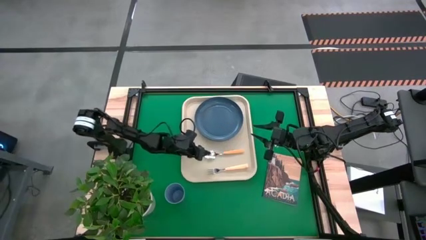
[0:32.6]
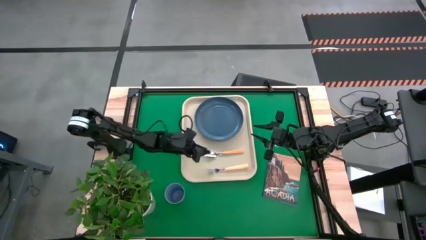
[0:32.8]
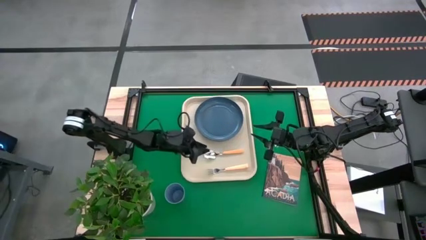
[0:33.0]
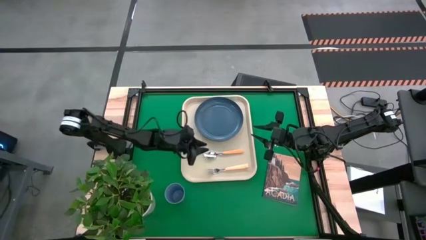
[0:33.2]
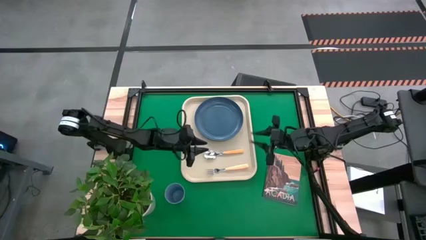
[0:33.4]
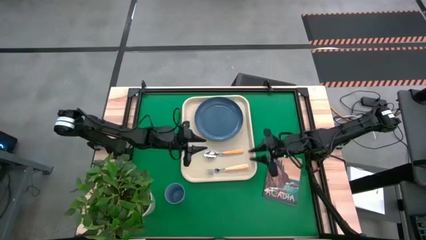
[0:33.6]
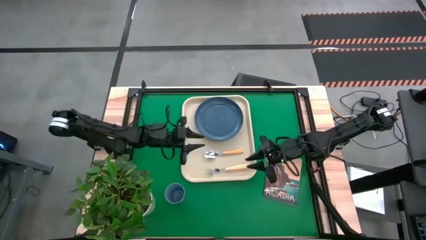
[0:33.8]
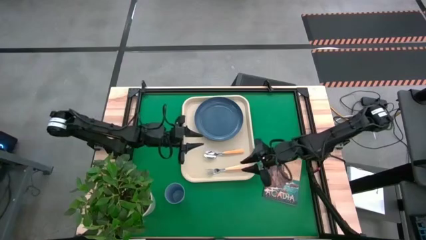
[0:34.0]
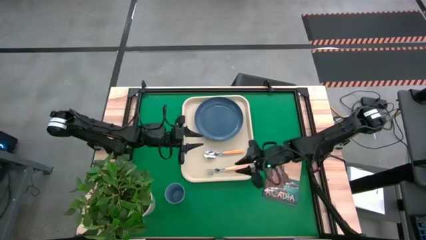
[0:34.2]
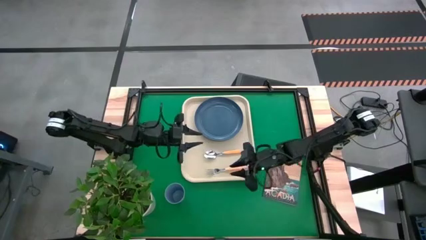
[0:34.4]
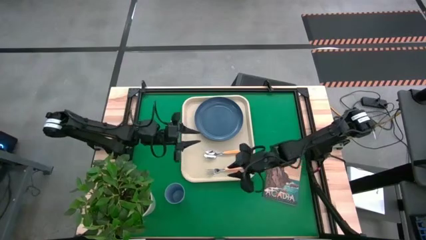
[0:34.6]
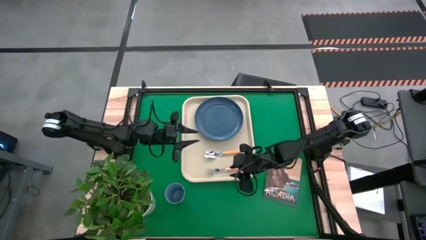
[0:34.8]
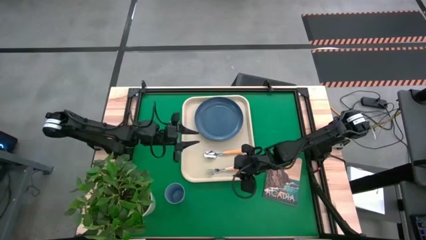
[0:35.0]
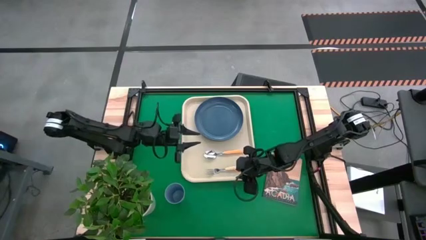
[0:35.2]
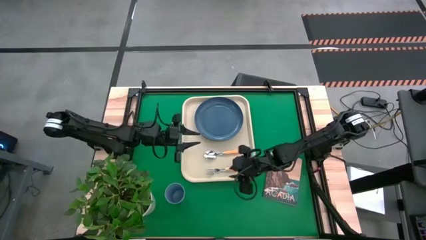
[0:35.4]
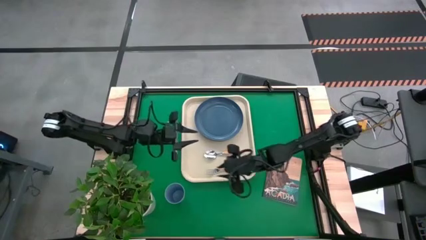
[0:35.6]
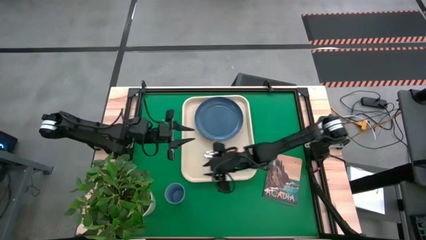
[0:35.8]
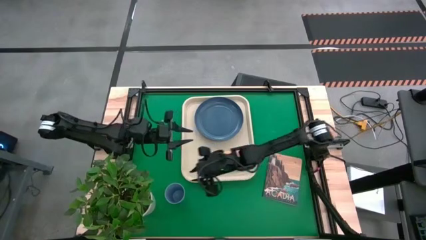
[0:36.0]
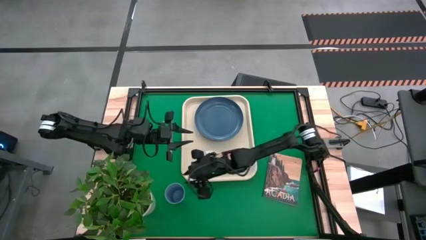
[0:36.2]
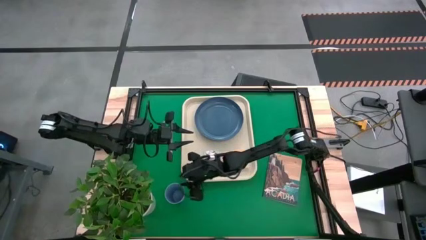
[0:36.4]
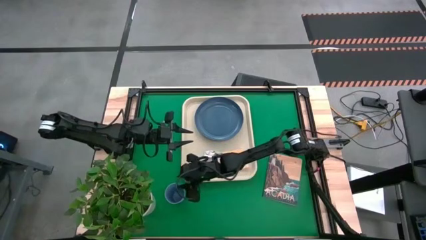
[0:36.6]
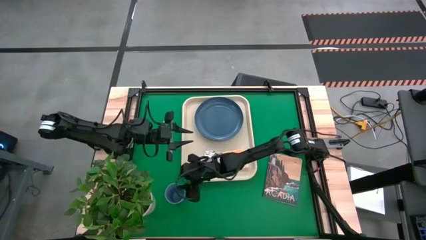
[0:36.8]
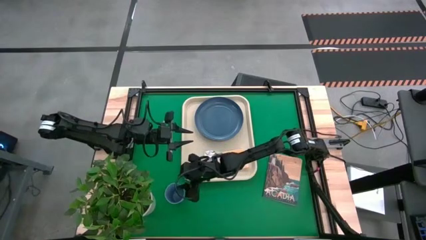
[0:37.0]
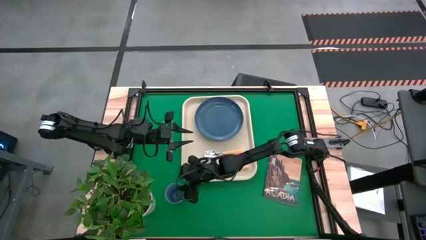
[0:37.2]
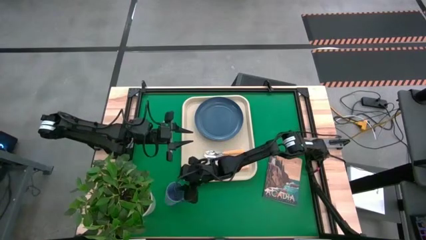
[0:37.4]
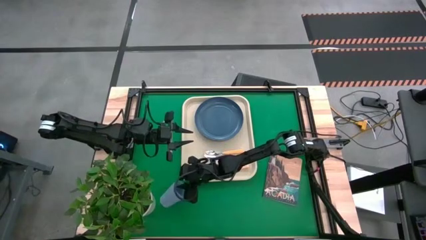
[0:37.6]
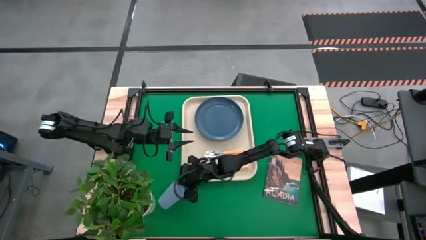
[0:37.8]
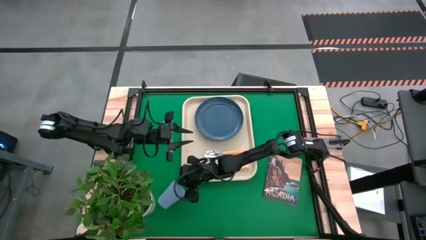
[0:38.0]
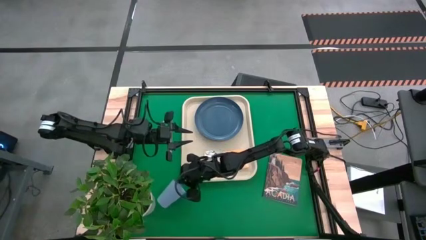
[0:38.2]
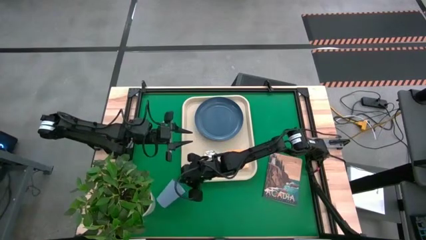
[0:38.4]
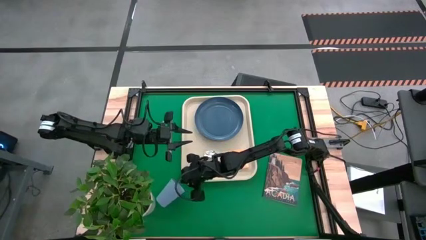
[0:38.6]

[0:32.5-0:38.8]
Task: Pick and place plate/cup/fork/spoon on tray
Put the blue cup on the white tray to the top left of the orange spoon

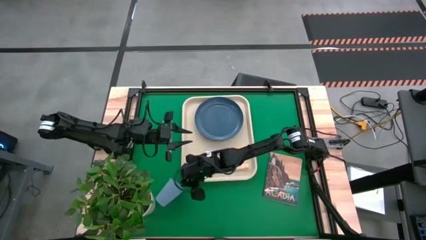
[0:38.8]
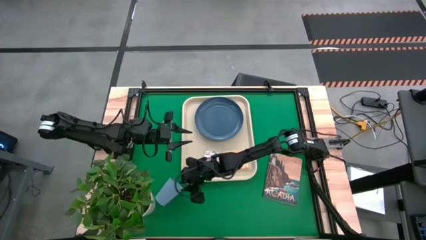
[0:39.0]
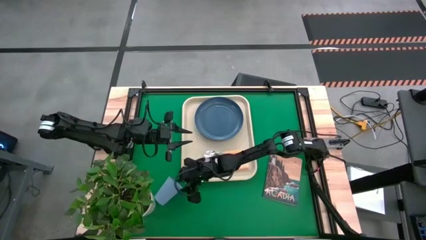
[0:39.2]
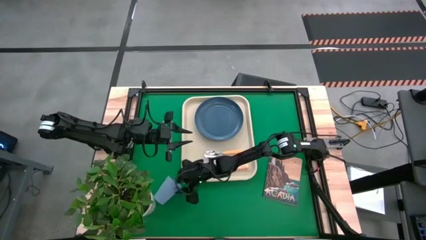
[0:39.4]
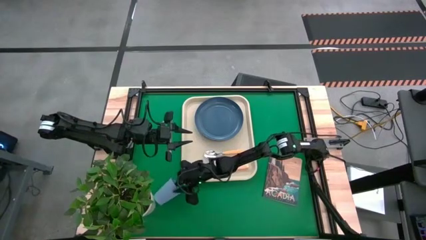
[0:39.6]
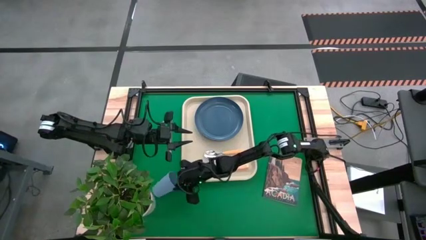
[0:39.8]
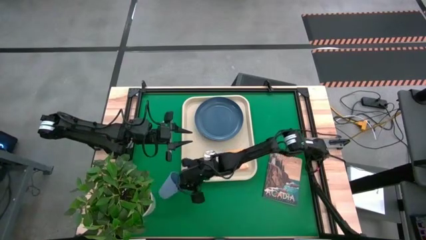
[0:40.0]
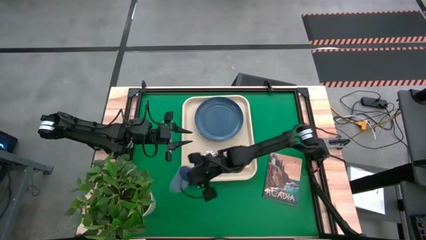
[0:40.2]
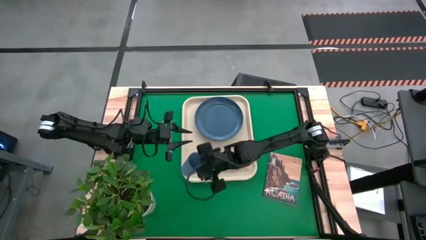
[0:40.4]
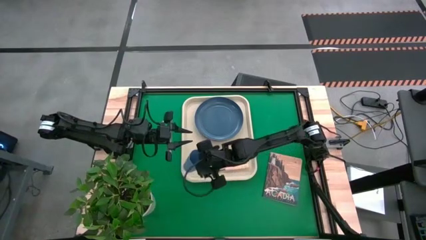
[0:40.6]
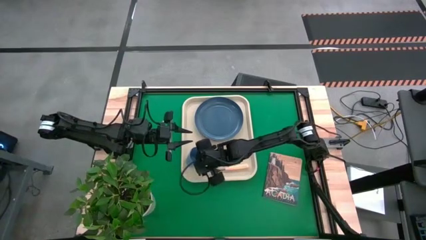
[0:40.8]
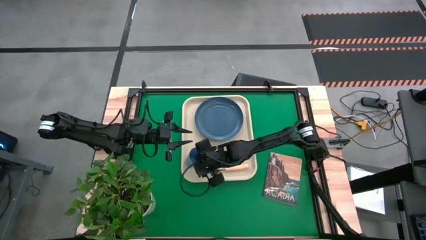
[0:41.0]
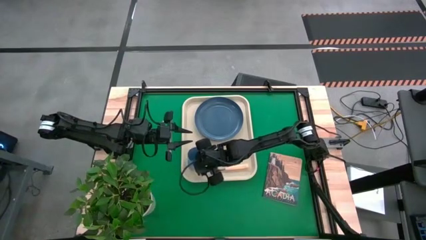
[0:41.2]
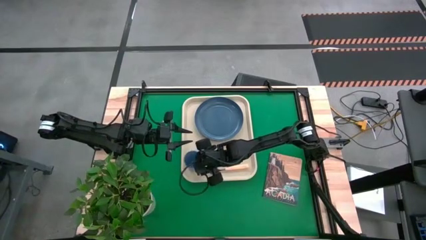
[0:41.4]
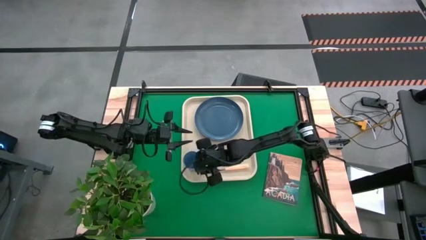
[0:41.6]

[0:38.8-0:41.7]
Put the blue cup on the white tray to the top left of the orange spoon

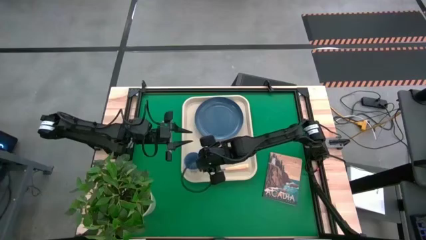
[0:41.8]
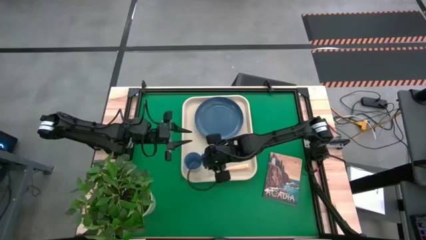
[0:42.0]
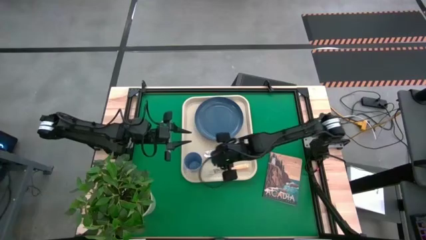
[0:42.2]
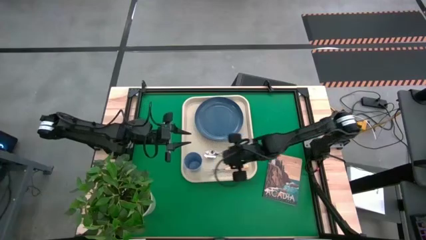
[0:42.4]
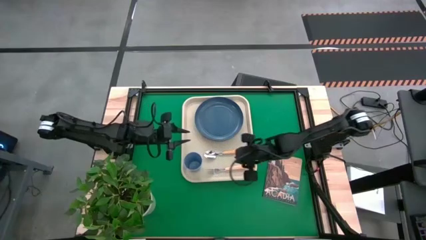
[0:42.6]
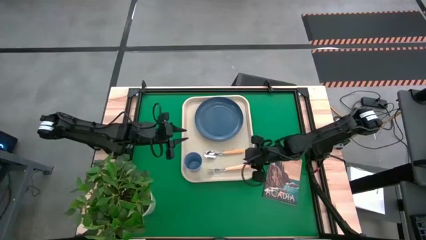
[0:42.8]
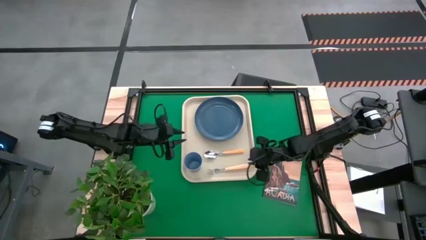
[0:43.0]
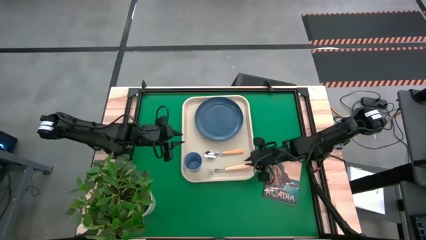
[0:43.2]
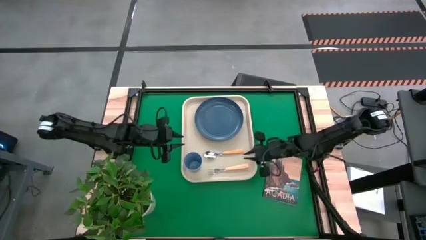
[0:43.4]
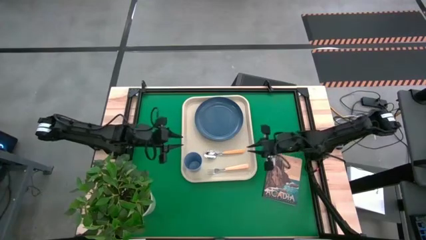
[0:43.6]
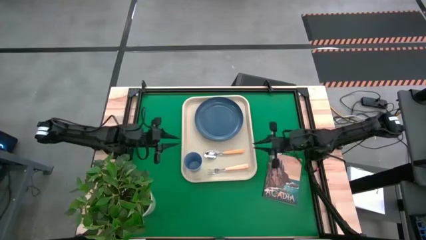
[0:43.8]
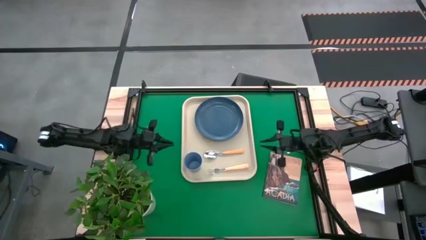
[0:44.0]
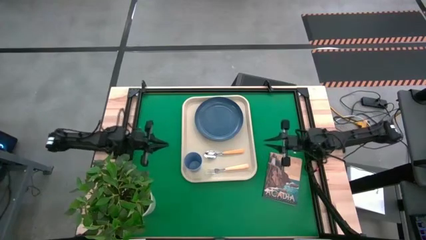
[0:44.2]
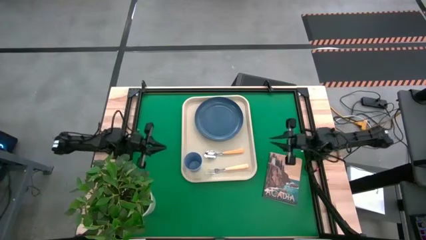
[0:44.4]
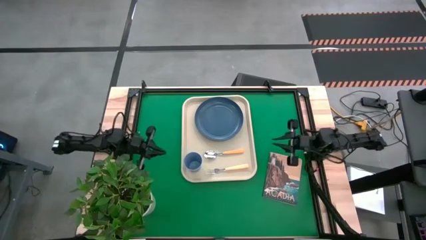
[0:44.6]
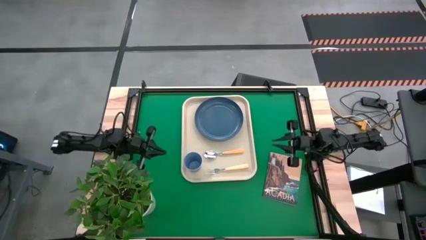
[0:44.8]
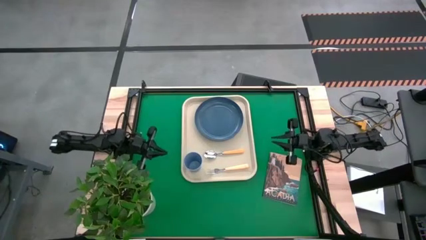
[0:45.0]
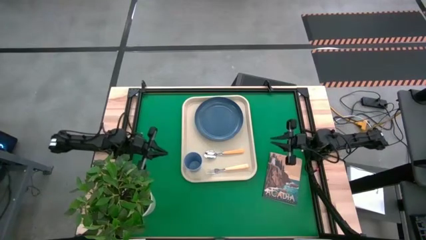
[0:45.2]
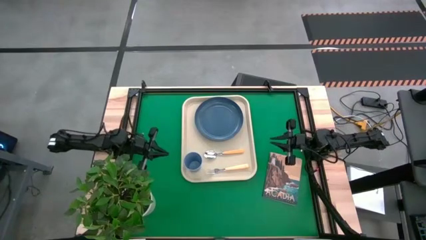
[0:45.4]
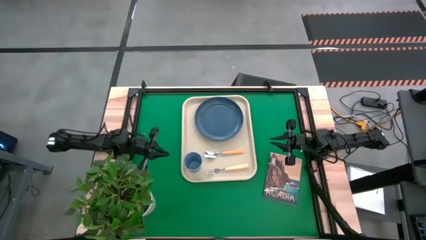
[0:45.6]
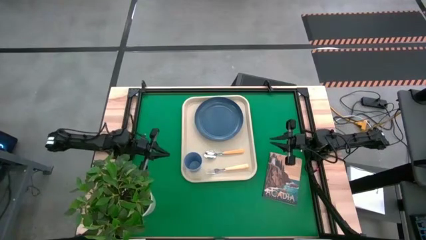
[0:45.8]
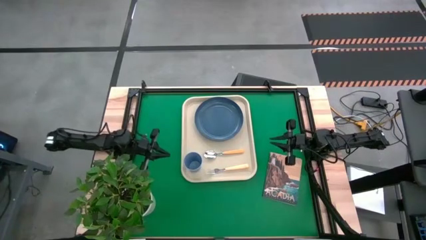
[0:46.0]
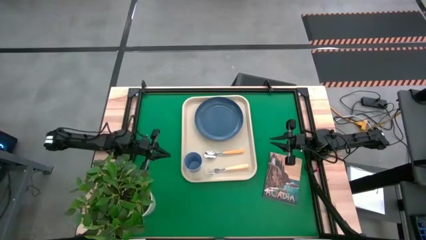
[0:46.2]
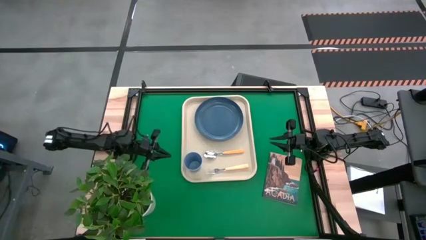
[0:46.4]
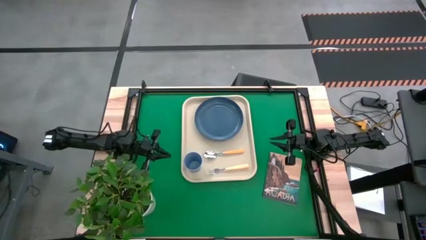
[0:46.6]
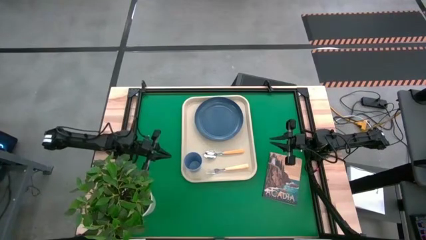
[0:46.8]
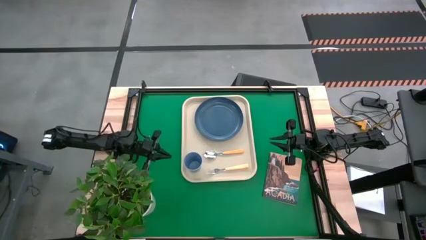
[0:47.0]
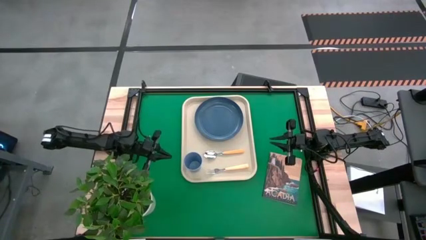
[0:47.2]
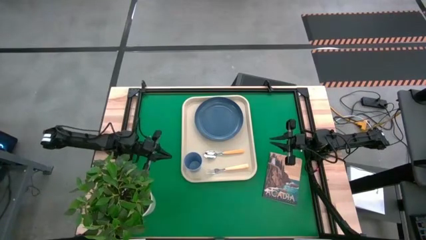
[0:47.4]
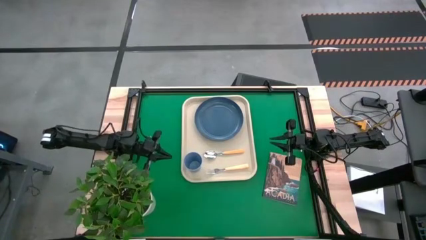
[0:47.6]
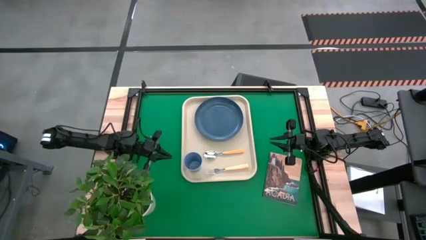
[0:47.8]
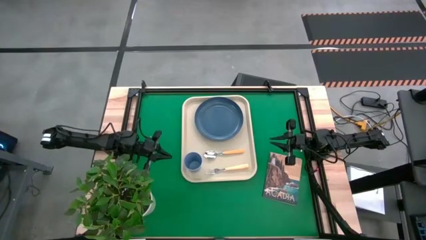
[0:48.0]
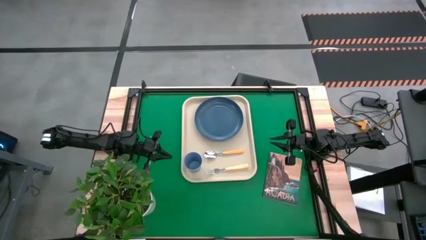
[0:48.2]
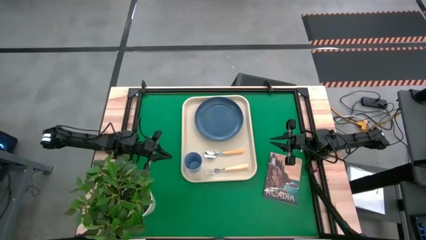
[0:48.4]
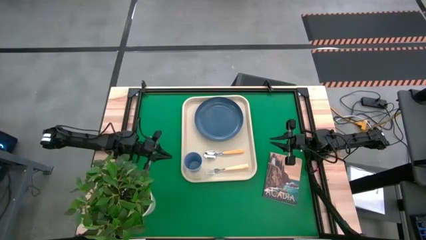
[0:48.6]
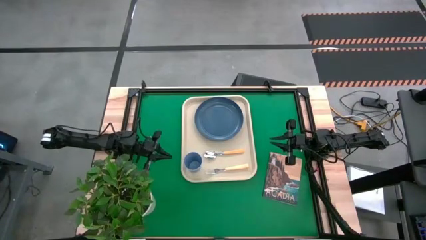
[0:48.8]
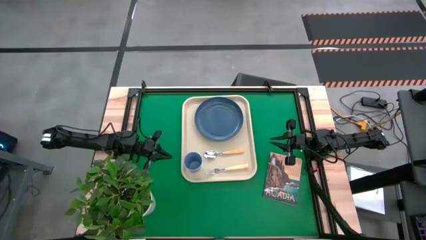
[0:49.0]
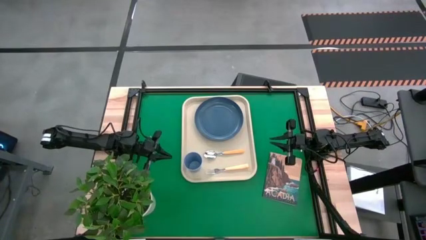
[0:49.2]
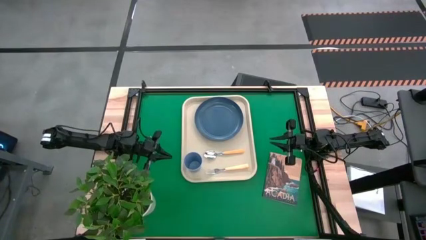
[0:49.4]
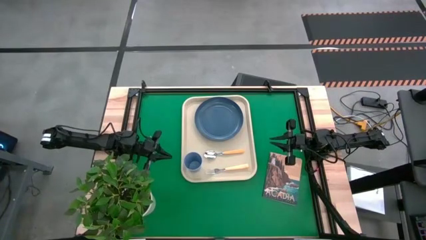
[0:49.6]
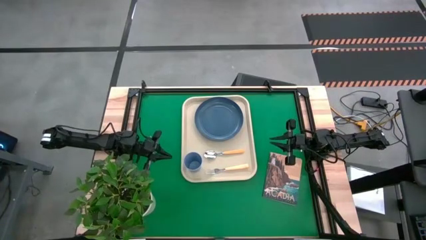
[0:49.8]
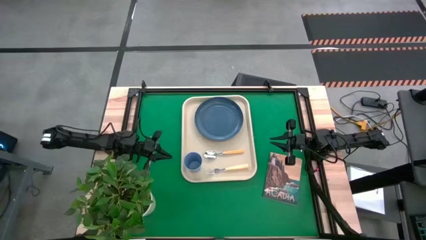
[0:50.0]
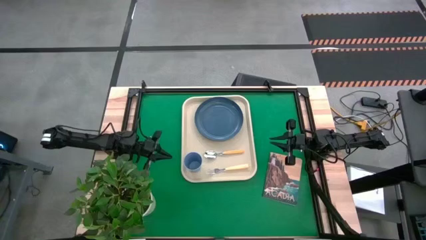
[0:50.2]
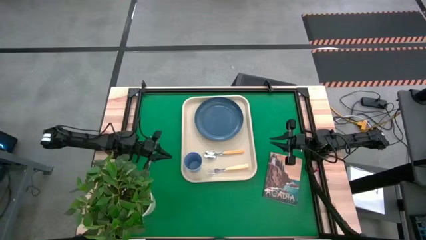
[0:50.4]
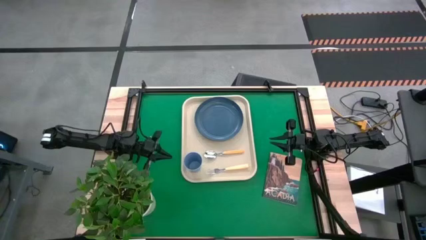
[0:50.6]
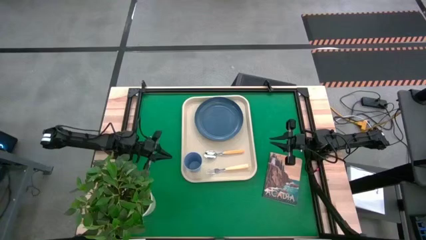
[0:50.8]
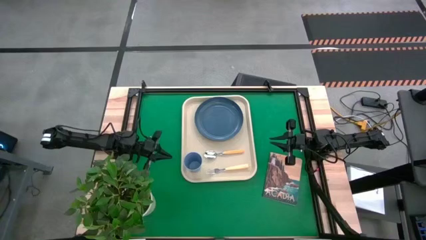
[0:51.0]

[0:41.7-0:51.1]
Return to Home Position
